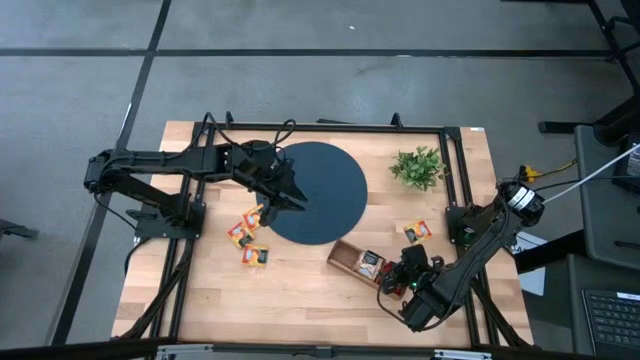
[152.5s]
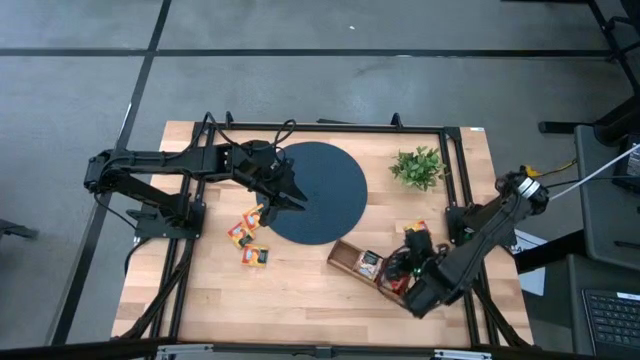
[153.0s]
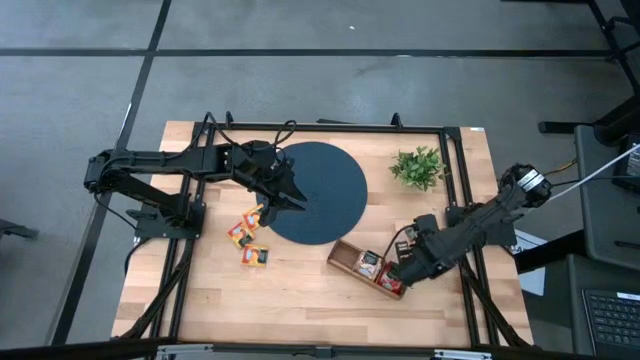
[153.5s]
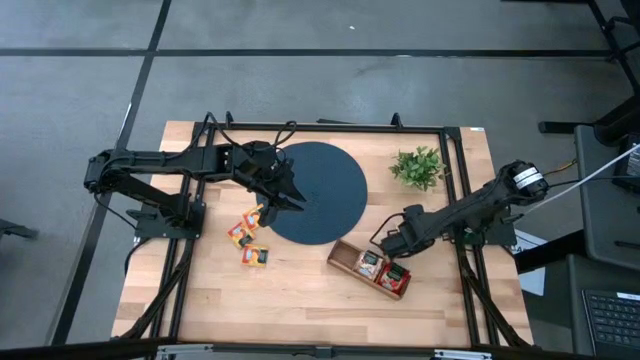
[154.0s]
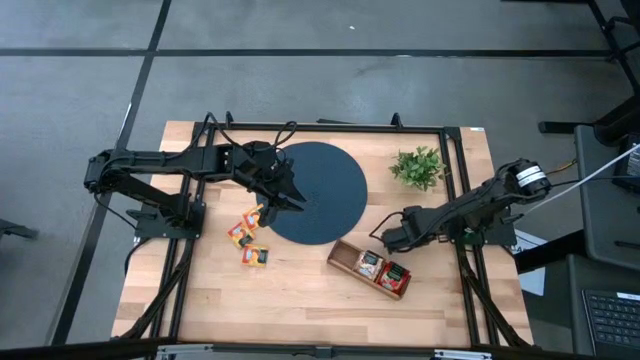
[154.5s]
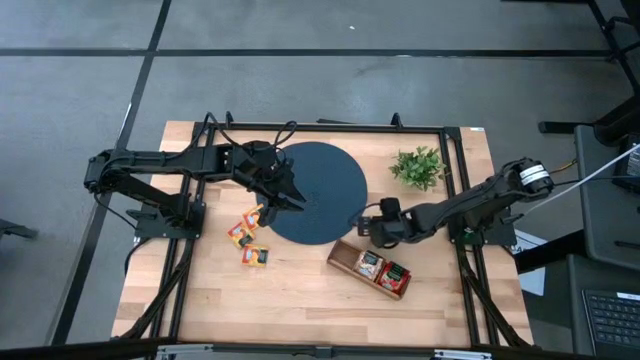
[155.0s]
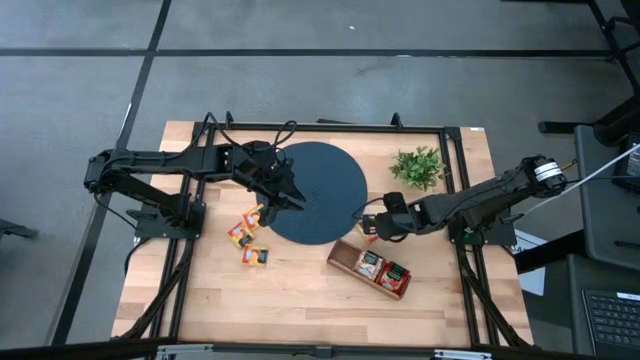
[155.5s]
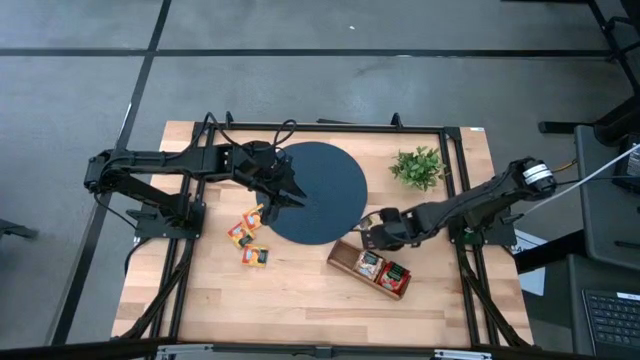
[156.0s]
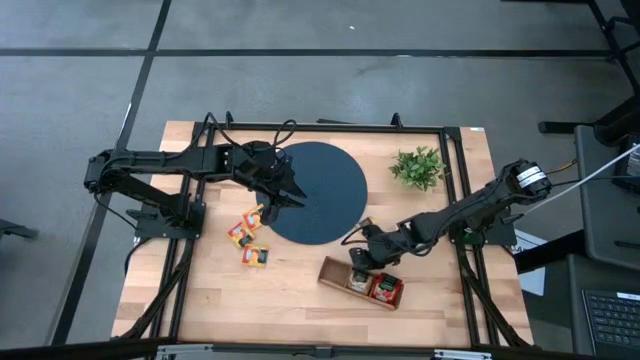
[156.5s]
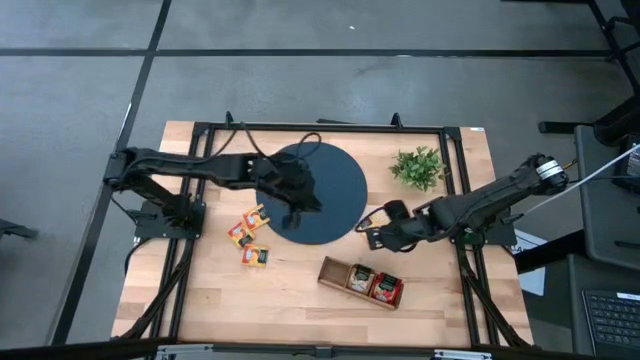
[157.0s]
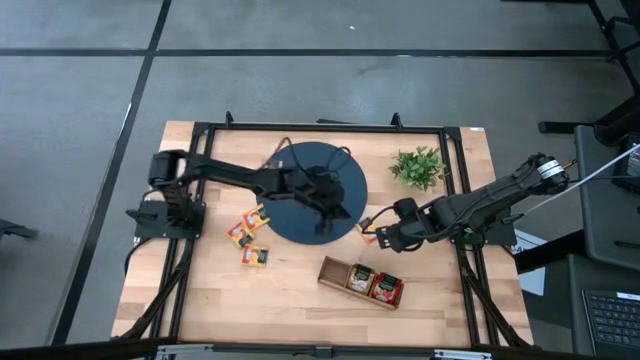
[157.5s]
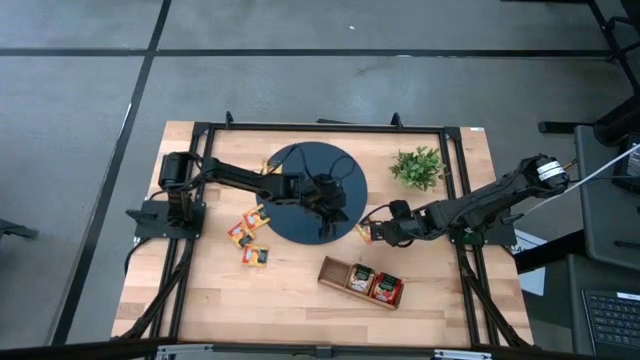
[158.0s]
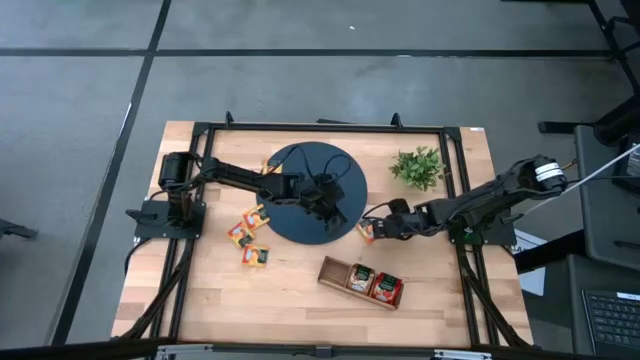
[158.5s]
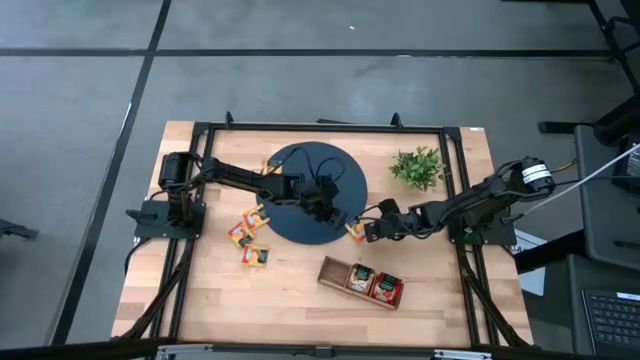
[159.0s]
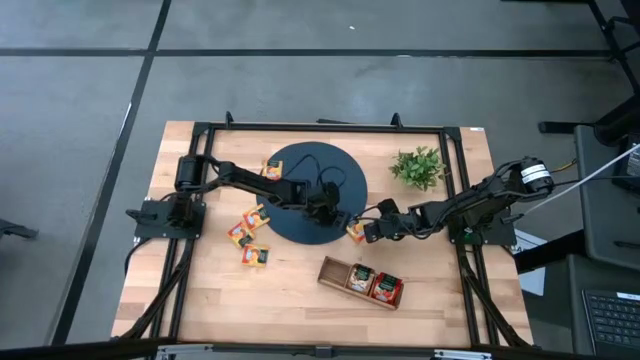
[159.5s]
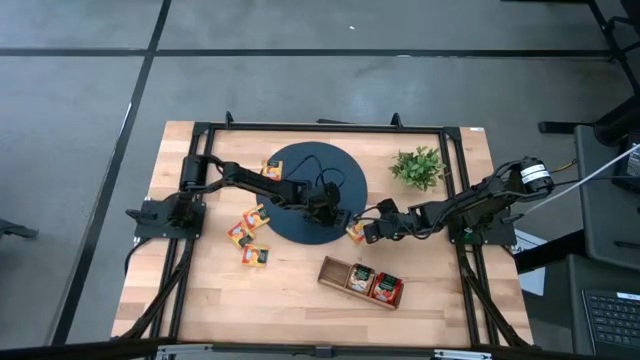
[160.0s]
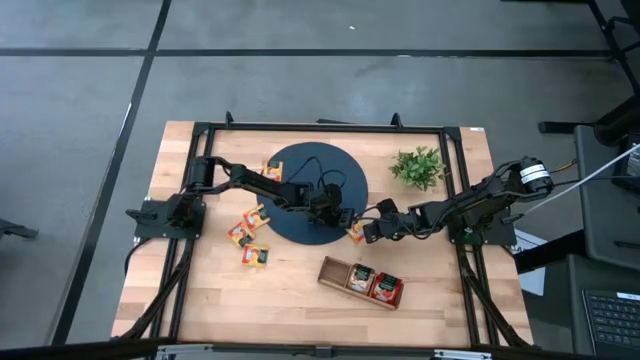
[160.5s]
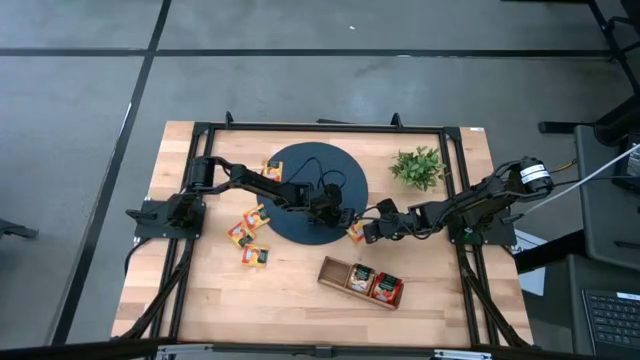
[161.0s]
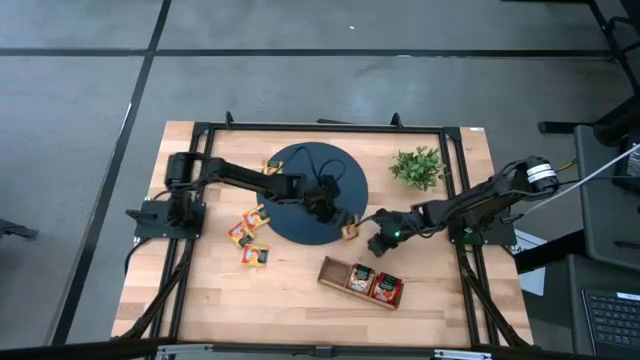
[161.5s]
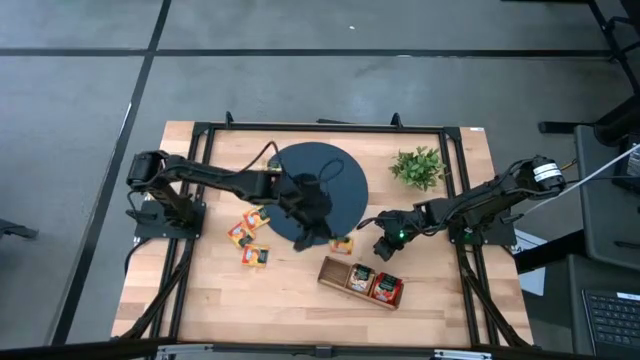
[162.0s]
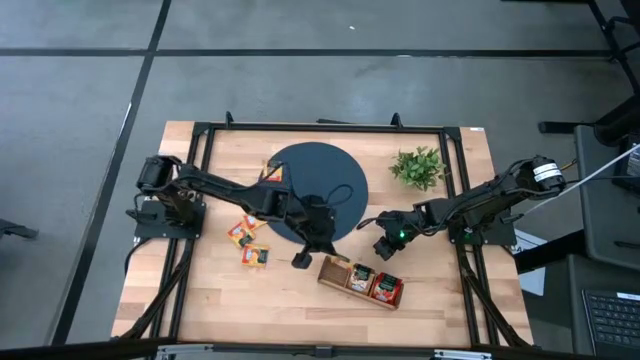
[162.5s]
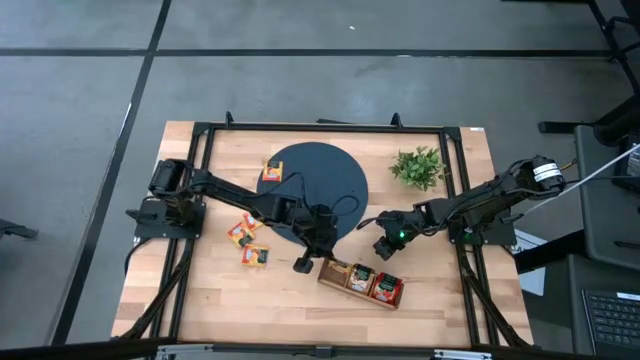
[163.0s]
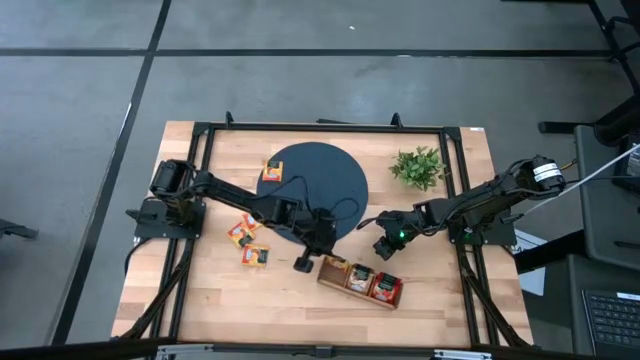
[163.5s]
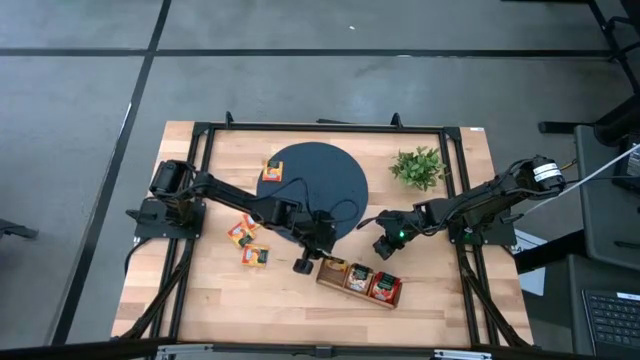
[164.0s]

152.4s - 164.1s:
Task: Pick & Place Tea
Put the yellow tea bag into the left section of the wooden organizer

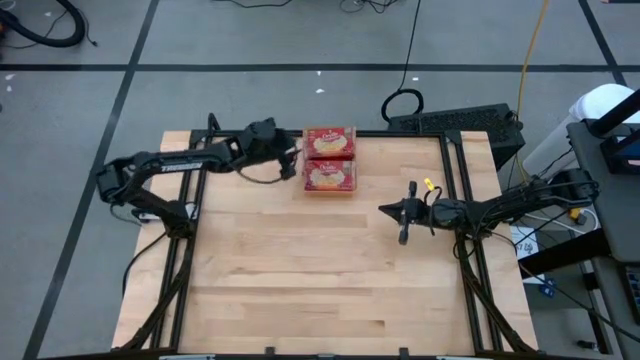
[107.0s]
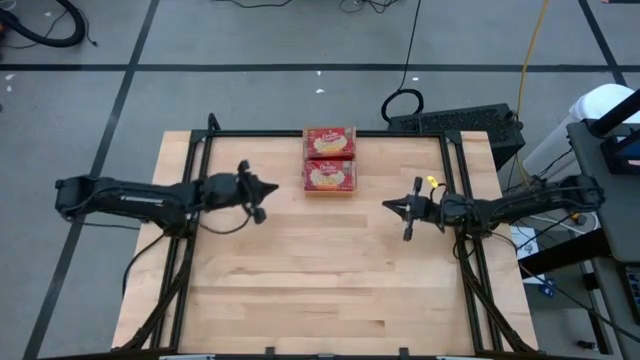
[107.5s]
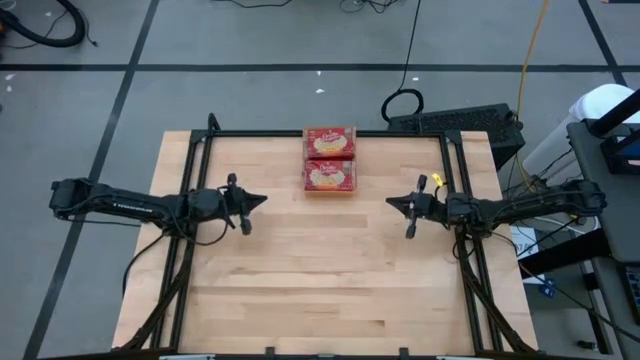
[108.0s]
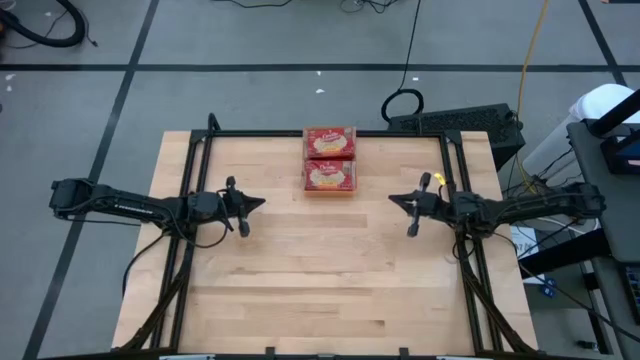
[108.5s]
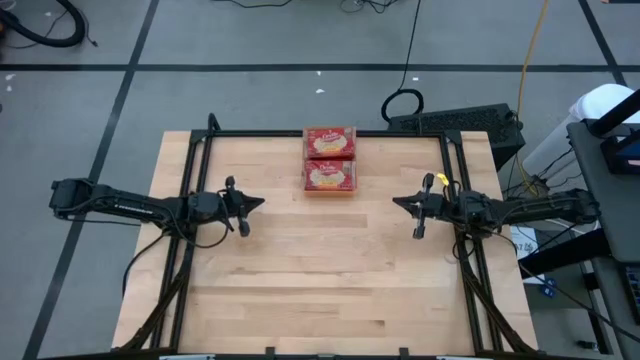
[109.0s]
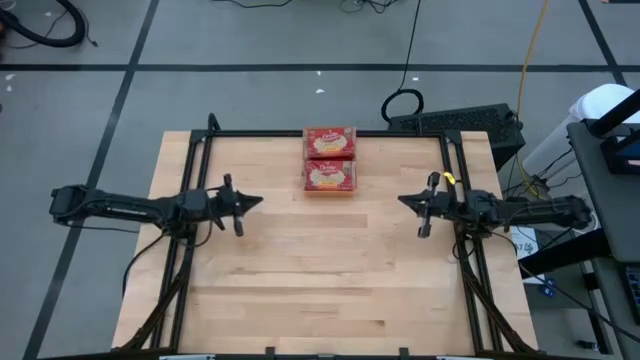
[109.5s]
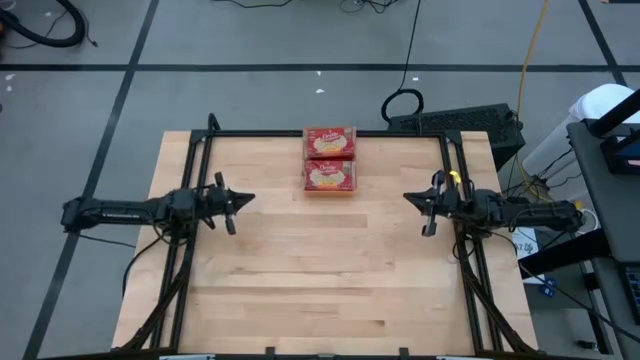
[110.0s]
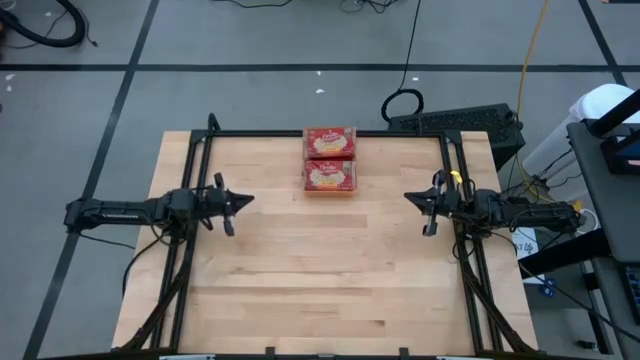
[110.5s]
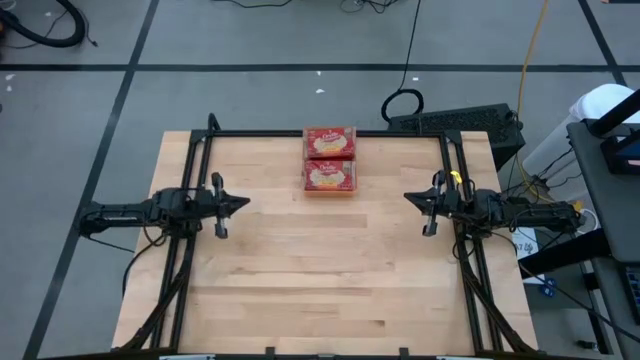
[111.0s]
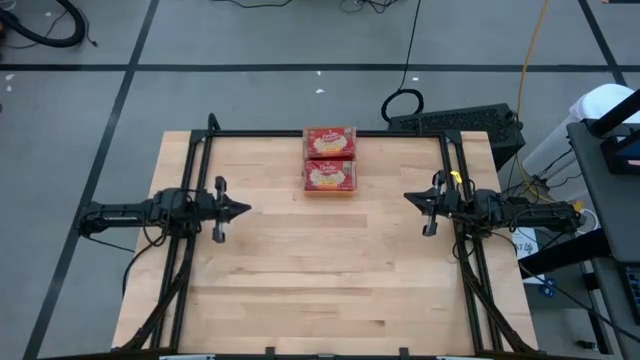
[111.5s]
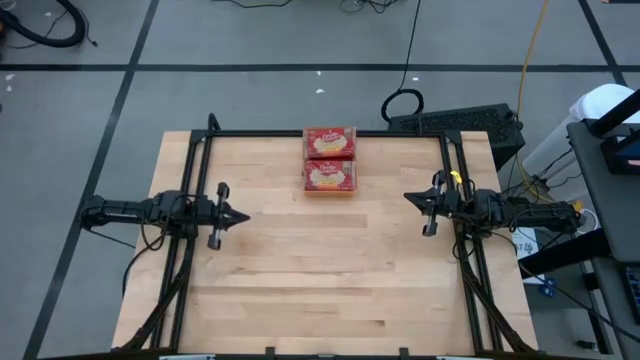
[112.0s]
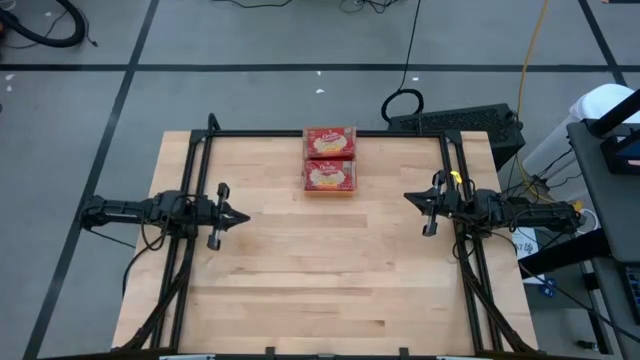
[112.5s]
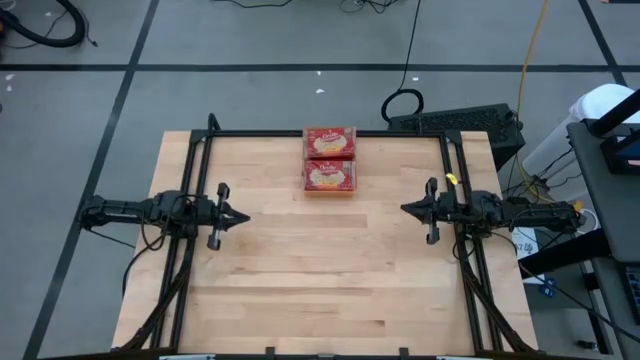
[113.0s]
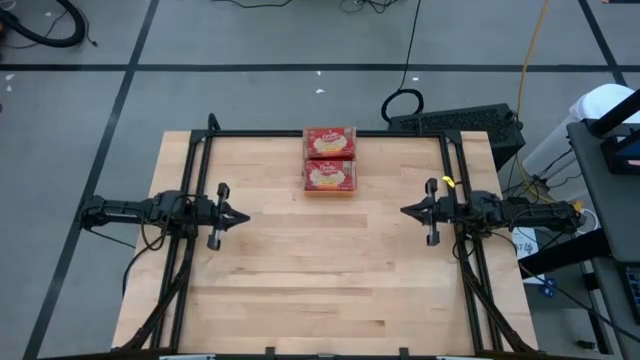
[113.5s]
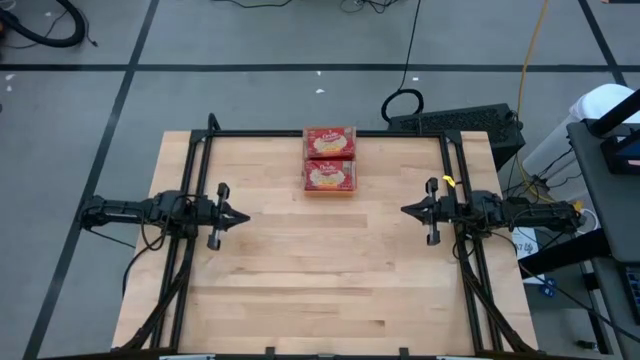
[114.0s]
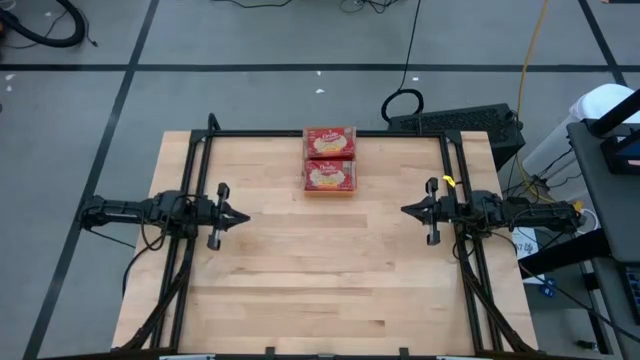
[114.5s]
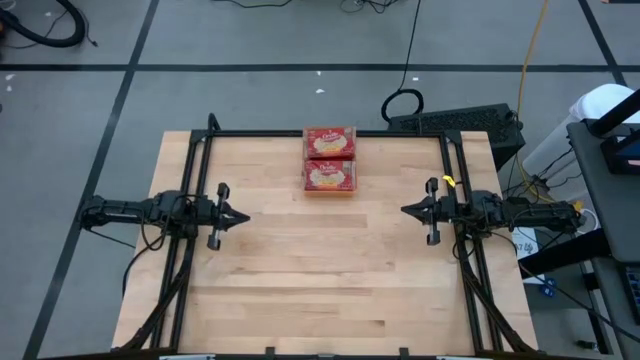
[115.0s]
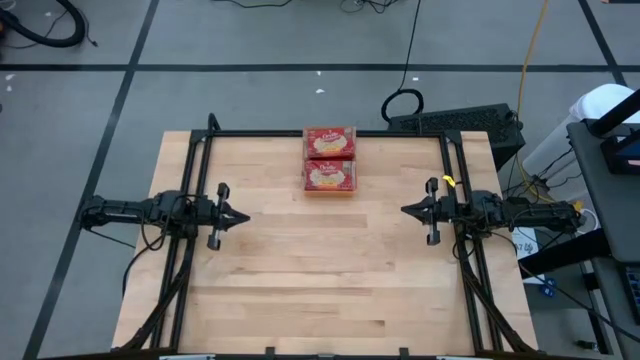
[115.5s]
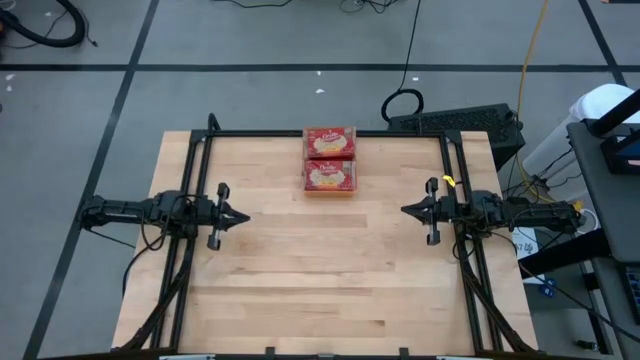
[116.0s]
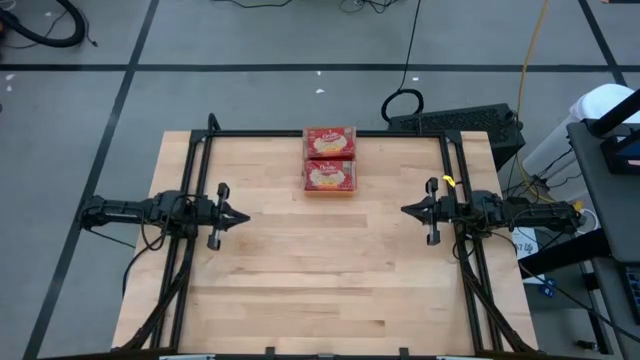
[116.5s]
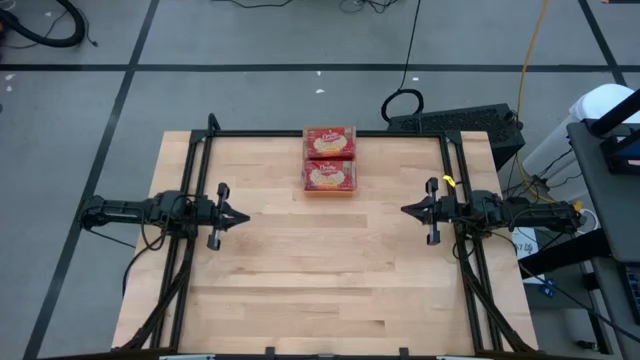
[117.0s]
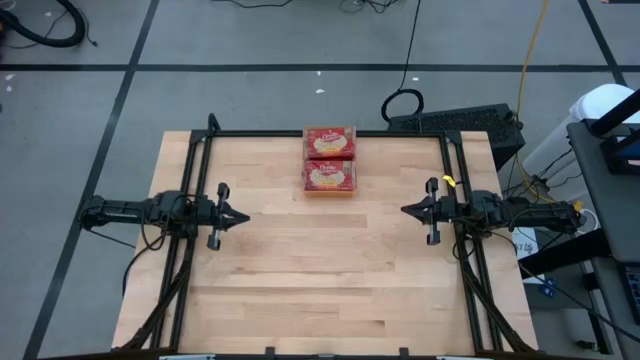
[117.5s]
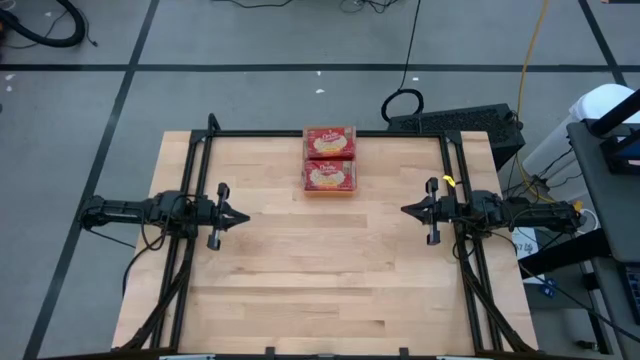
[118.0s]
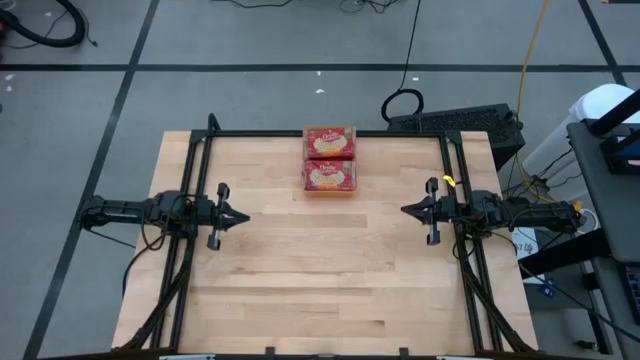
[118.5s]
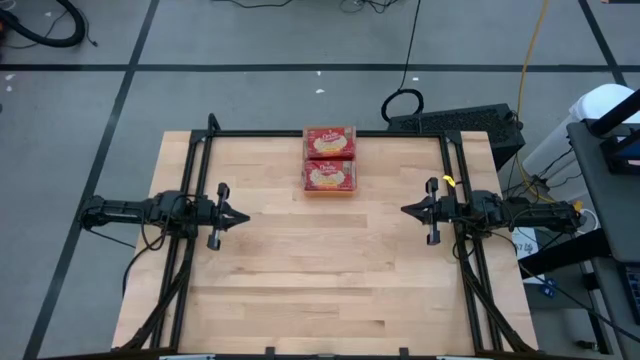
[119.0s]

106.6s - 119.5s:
Task: Sort popcorn bags into baskets
Return to Home Position
